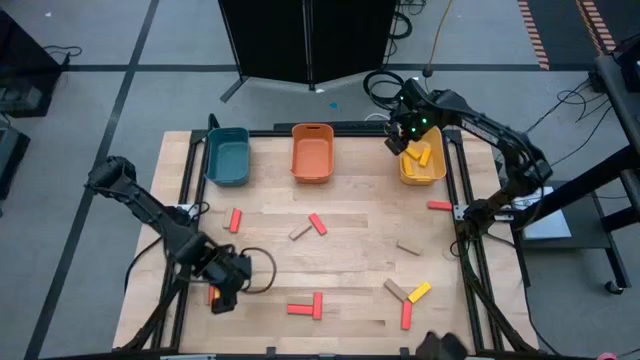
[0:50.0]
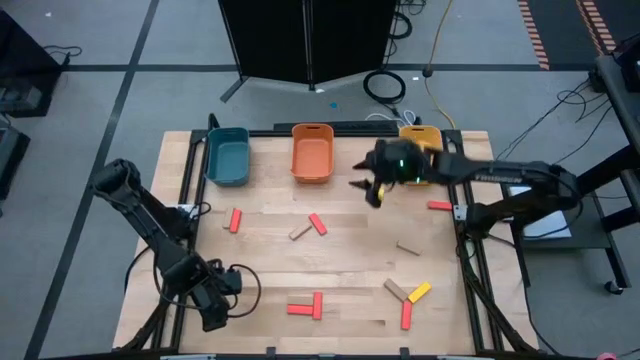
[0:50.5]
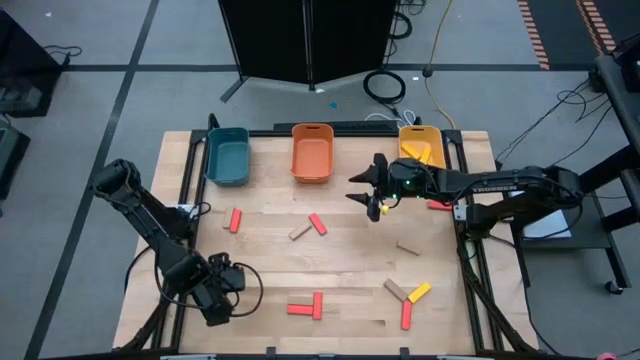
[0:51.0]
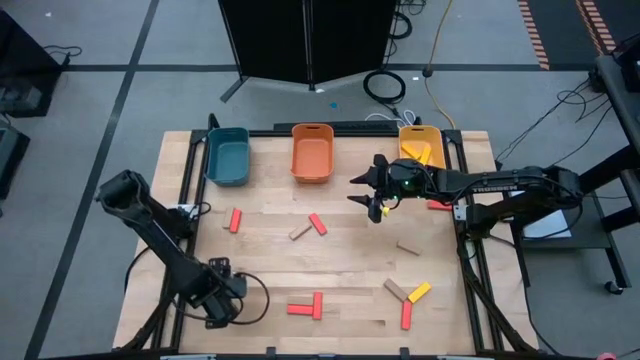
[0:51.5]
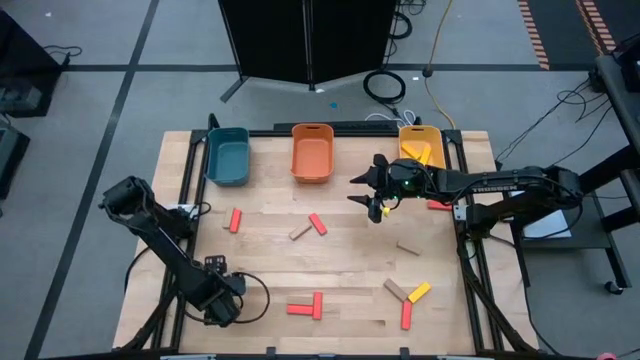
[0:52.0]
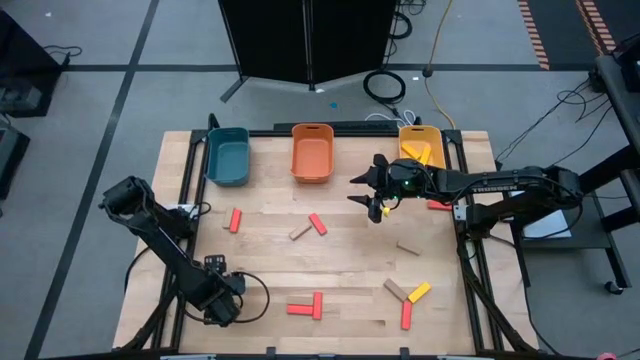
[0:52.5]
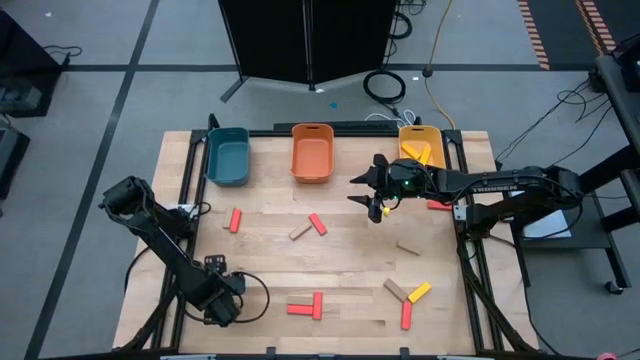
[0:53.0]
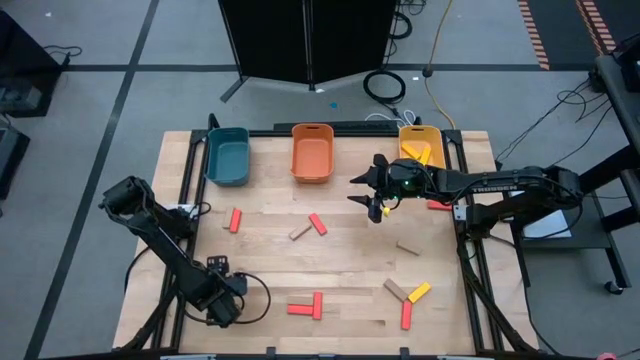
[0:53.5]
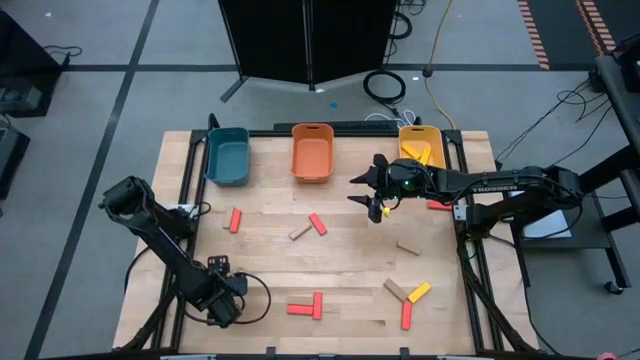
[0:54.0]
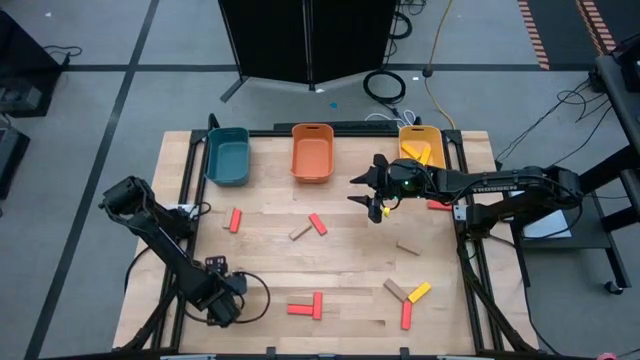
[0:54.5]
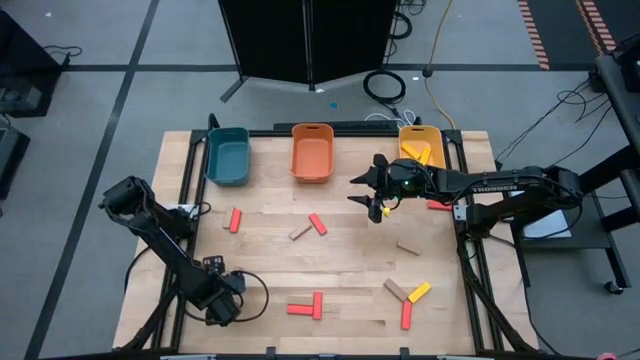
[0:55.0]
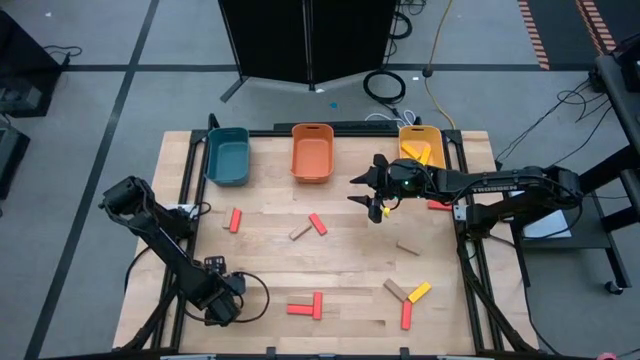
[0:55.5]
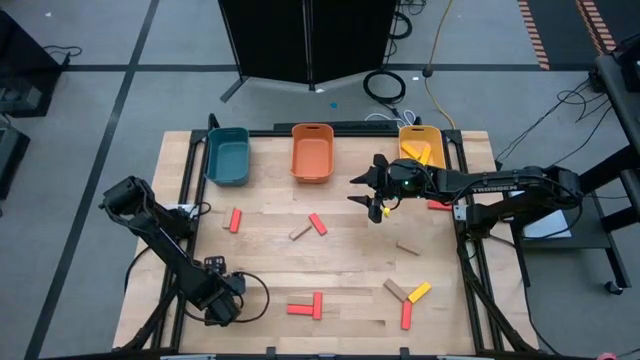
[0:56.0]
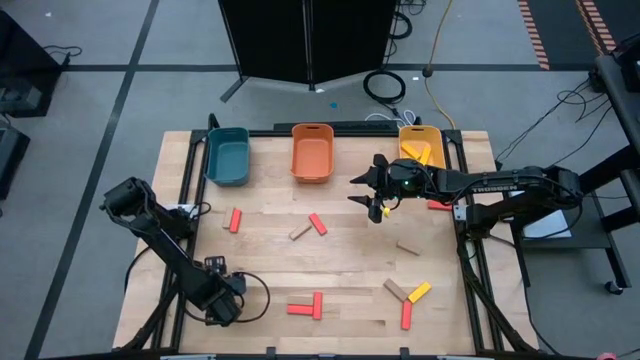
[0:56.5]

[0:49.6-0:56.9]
Task: Sort blocks
Put the yellow block into the yellow bin

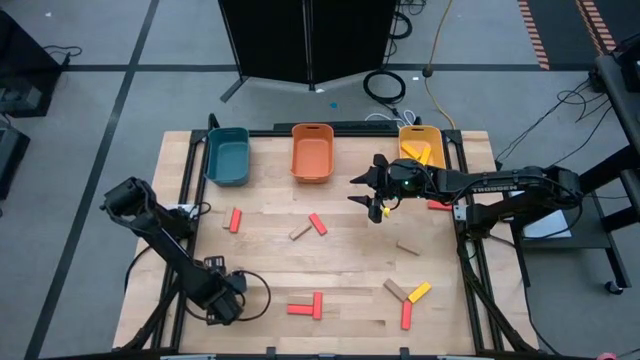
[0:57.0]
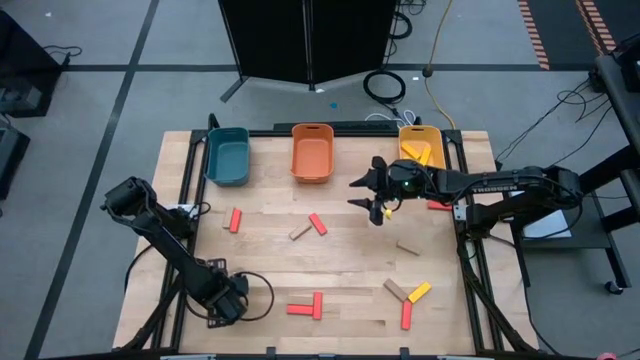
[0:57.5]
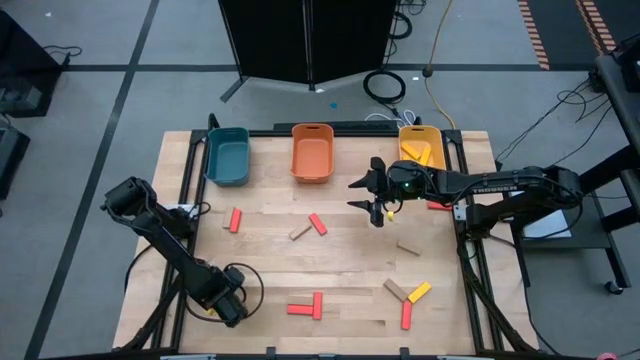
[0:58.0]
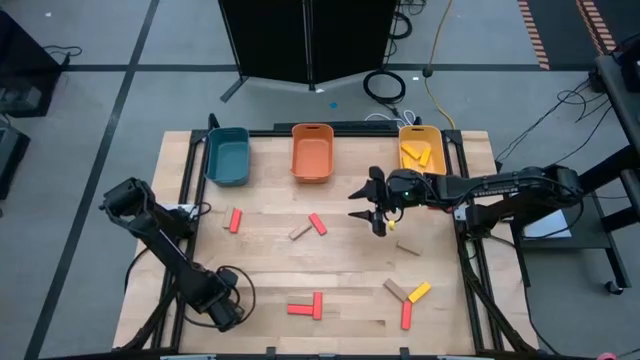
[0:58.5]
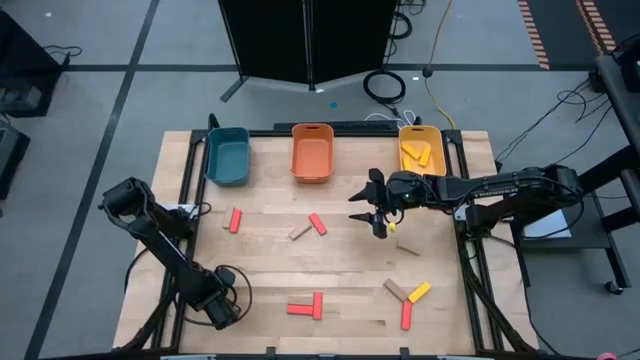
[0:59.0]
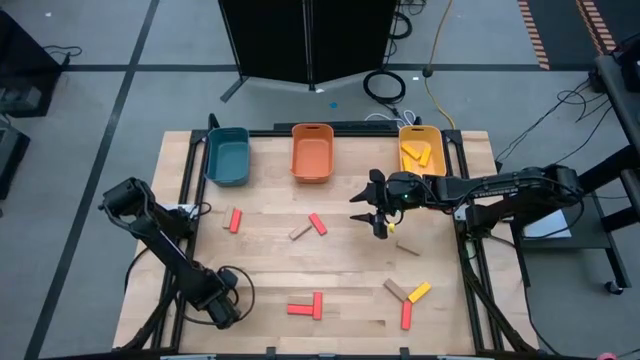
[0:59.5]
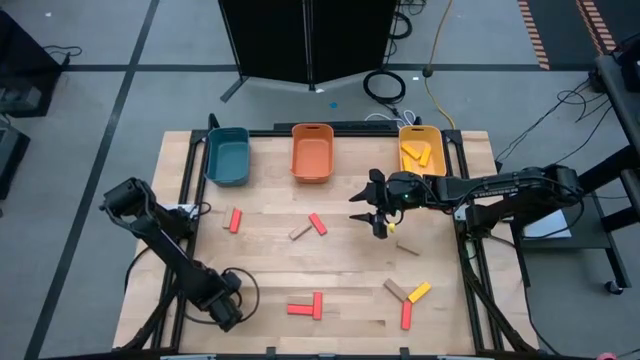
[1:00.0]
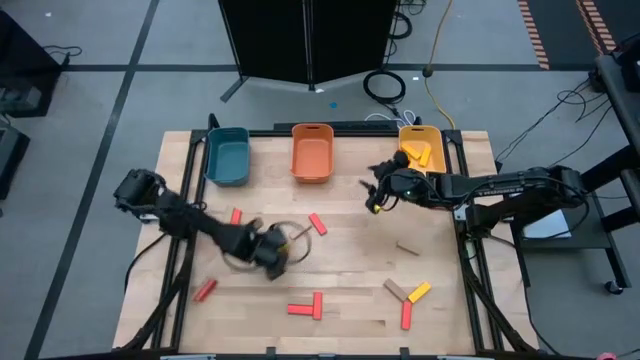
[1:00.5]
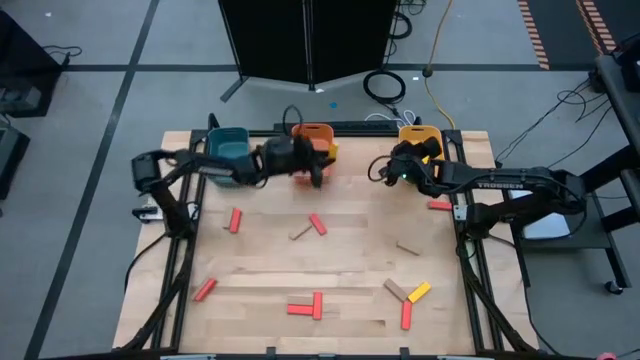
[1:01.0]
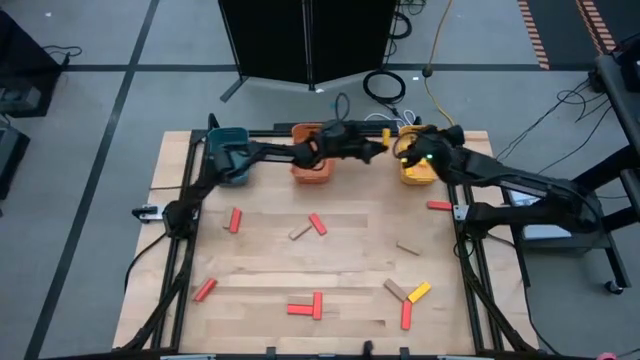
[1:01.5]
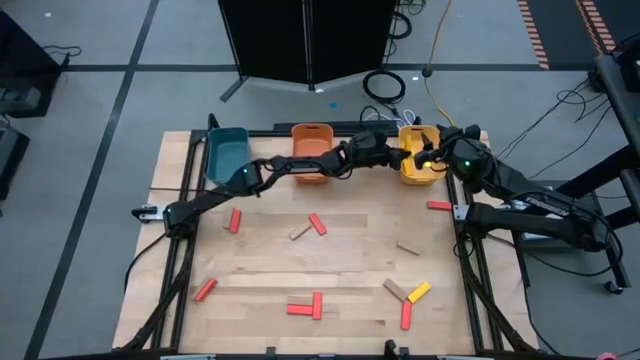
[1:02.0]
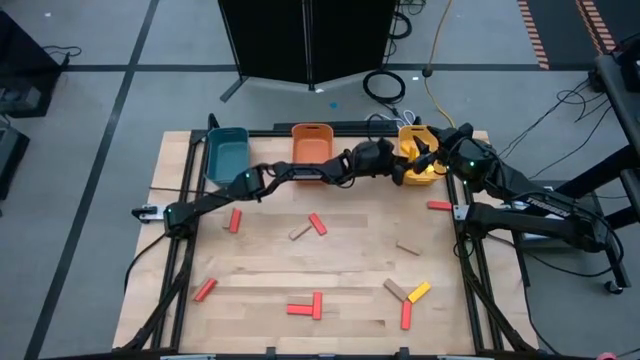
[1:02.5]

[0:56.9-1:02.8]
Put the yellow block into the yellow bin

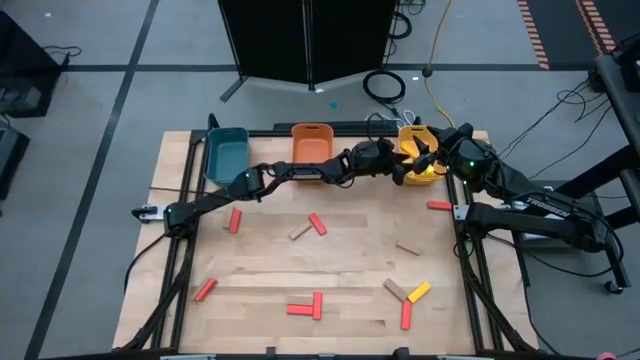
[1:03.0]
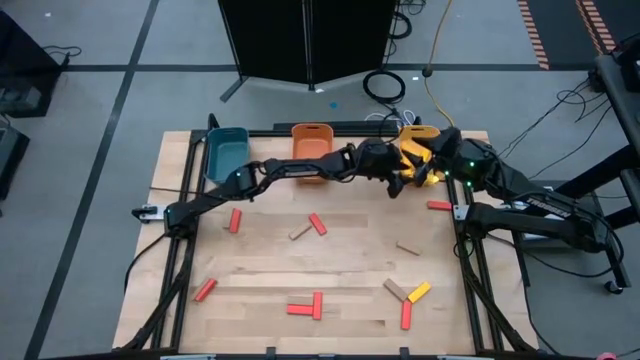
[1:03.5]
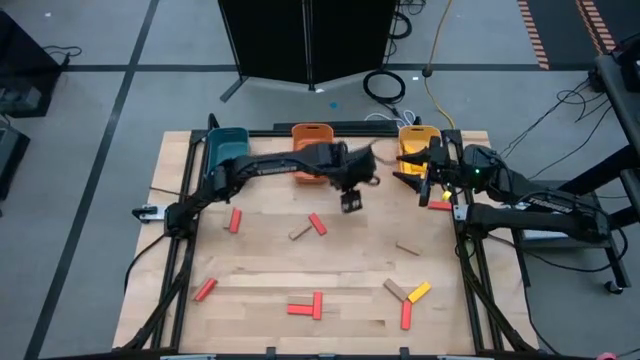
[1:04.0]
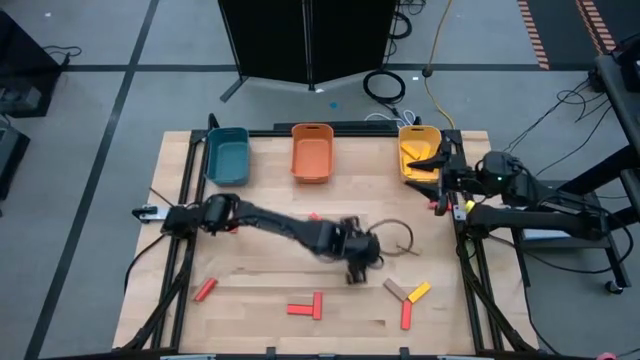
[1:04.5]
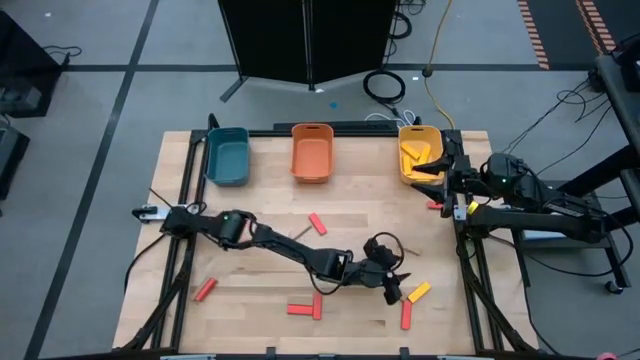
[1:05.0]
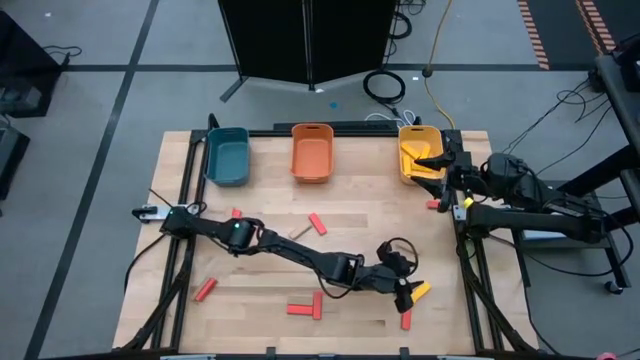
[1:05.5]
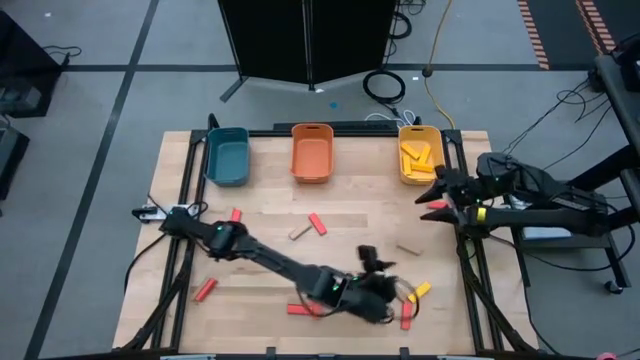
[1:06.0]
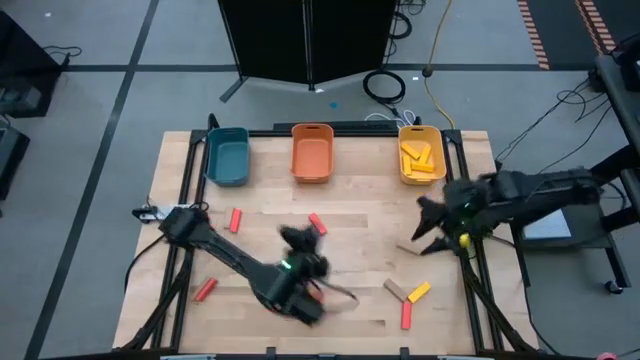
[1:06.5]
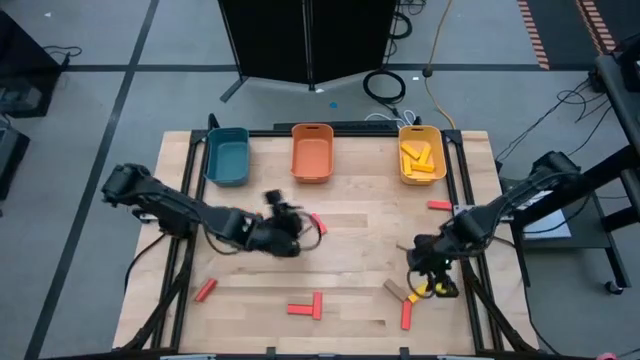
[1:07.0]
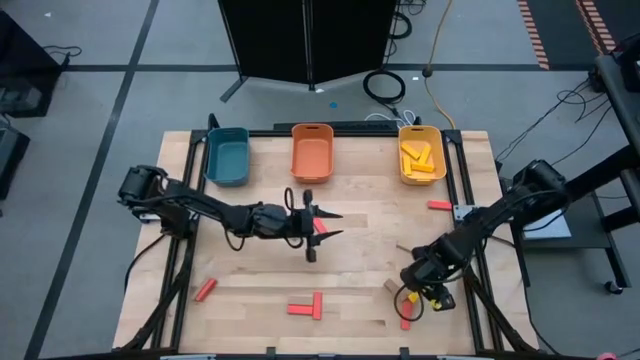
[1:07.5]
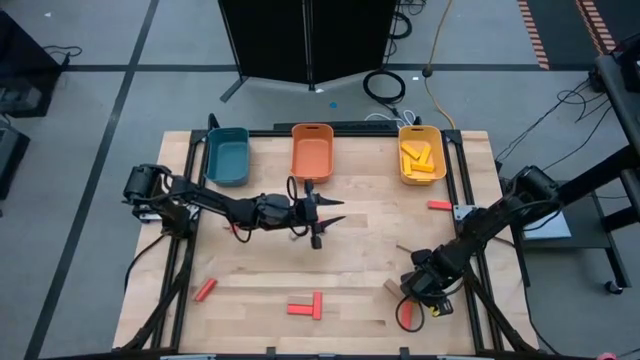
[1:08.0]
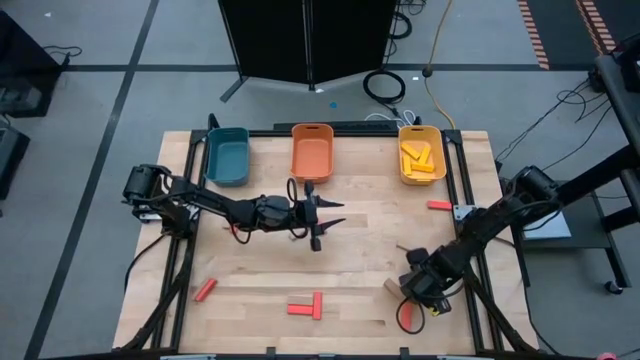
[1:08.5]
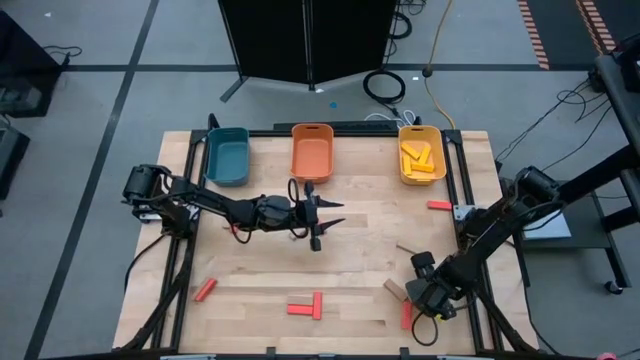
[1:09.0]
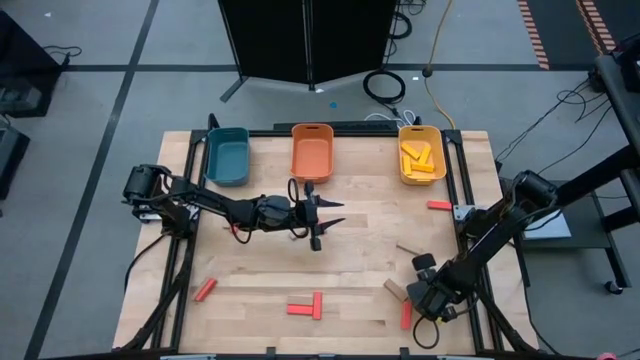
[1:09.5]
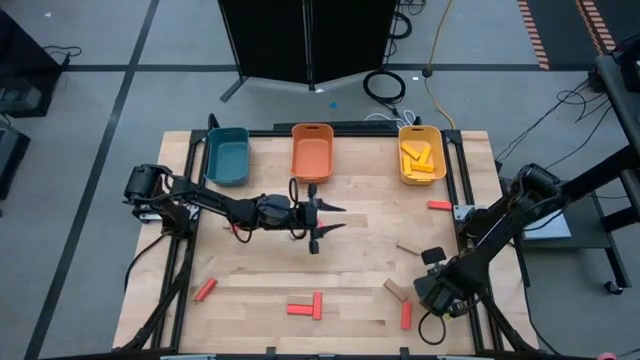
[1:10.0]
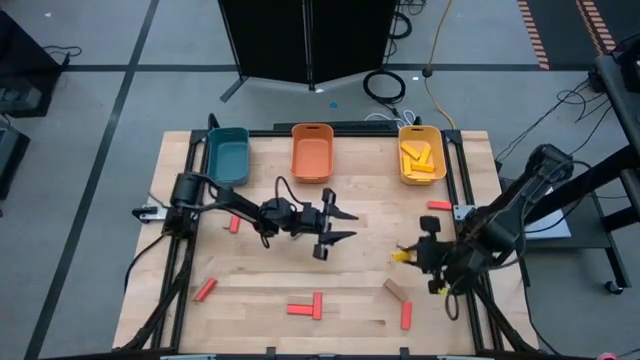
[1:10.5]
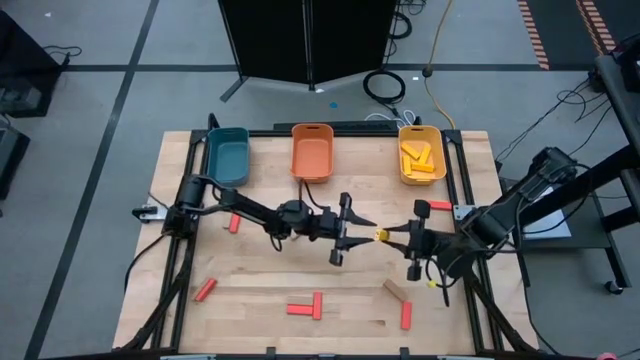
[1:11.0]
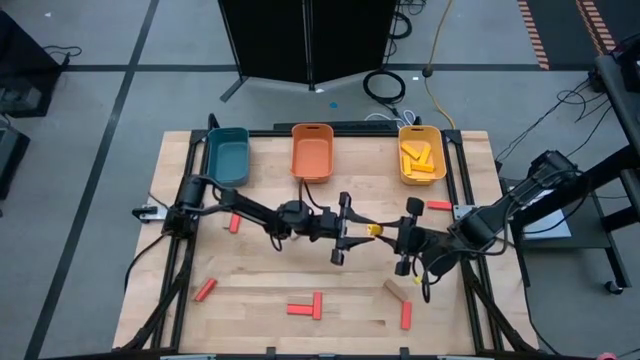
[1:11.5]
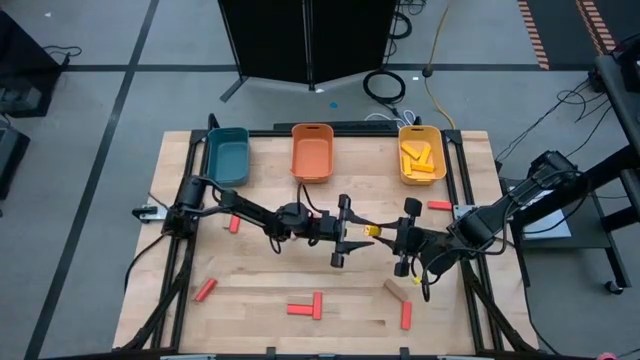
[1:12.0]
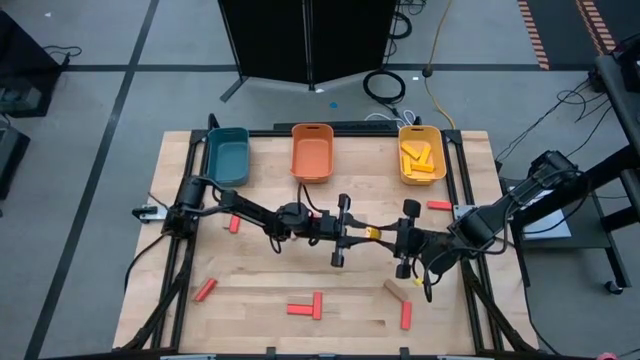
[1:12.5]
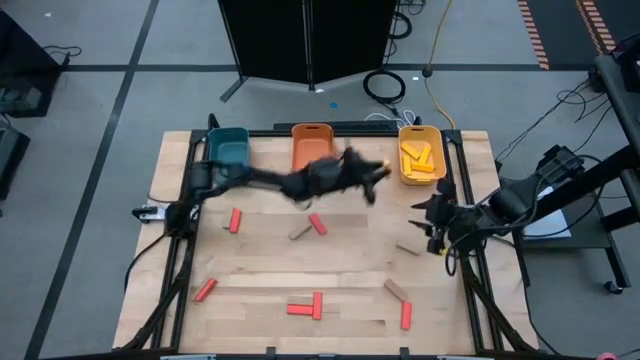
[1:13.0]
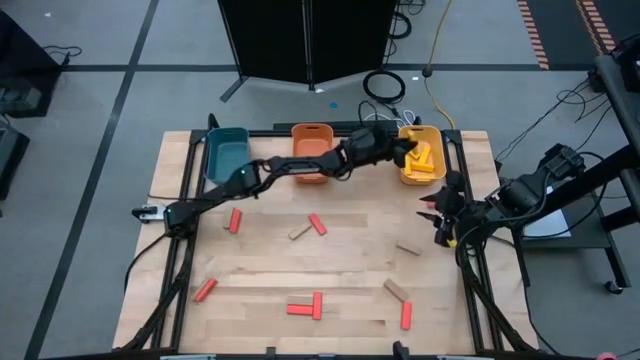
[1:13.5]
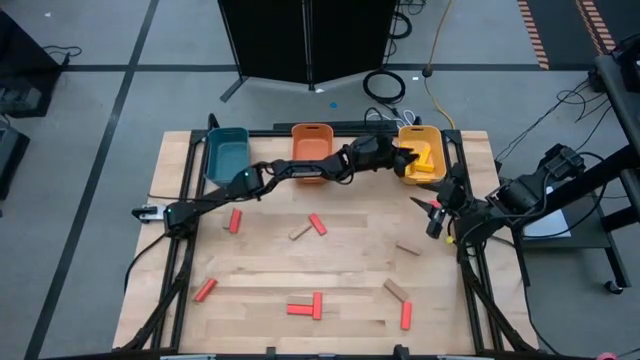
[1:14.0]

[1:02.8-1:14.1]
Put the yellow block into the yellow bin
